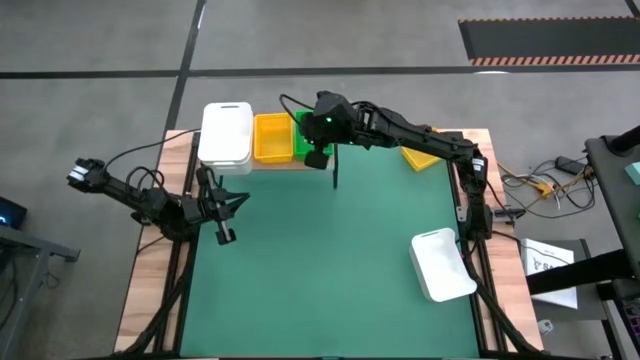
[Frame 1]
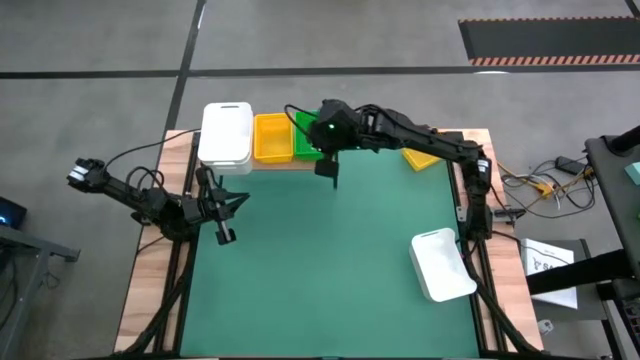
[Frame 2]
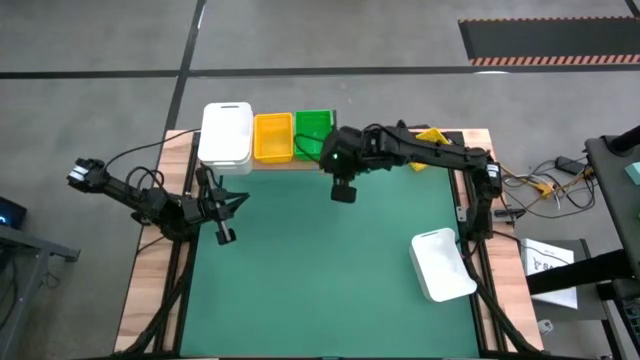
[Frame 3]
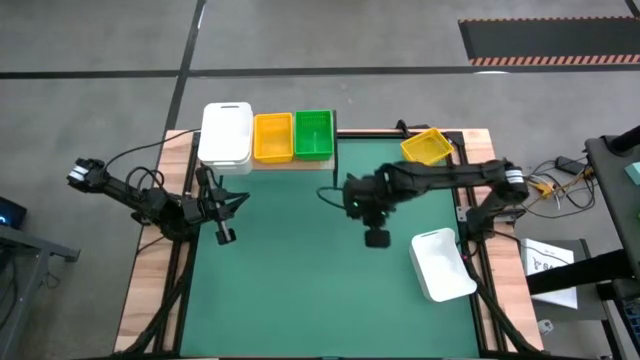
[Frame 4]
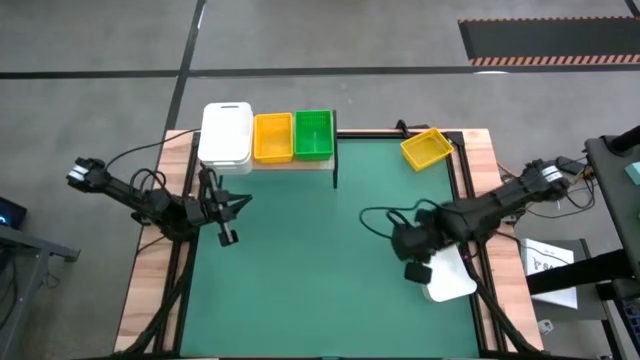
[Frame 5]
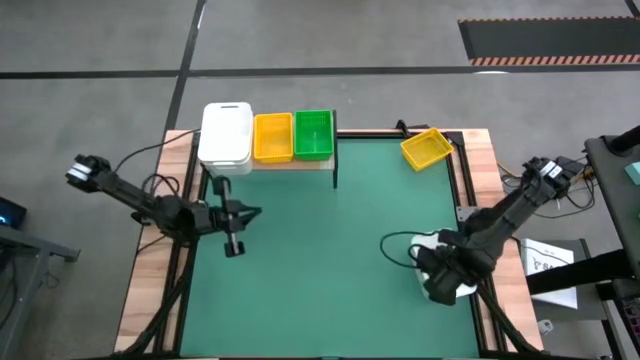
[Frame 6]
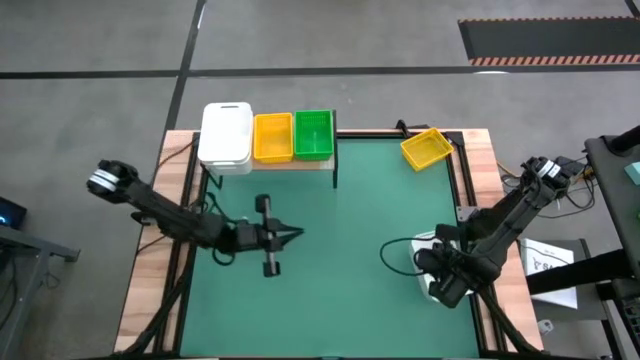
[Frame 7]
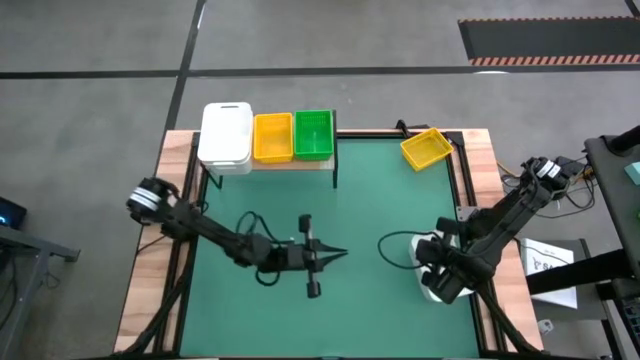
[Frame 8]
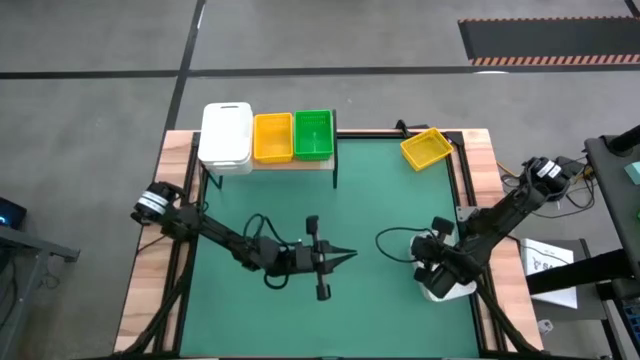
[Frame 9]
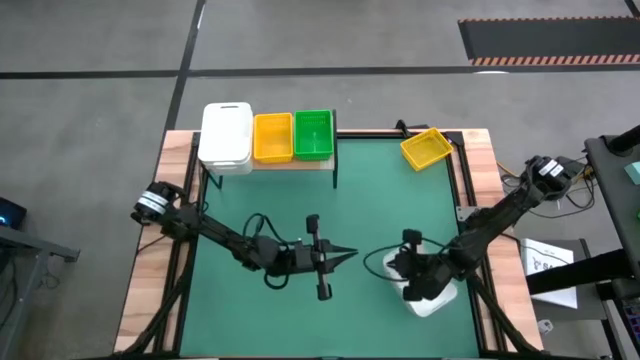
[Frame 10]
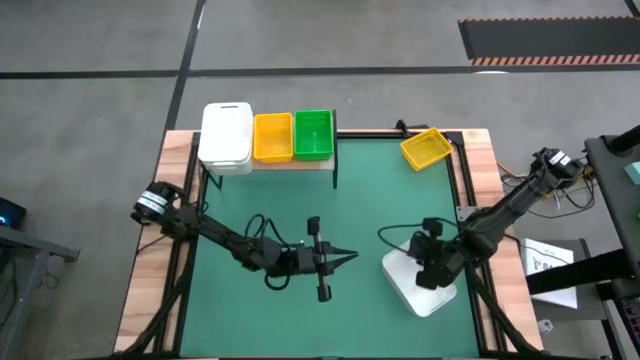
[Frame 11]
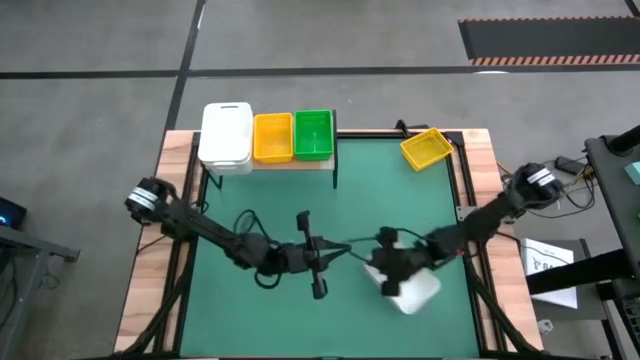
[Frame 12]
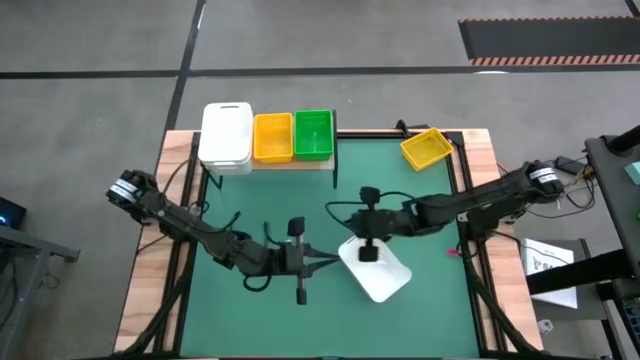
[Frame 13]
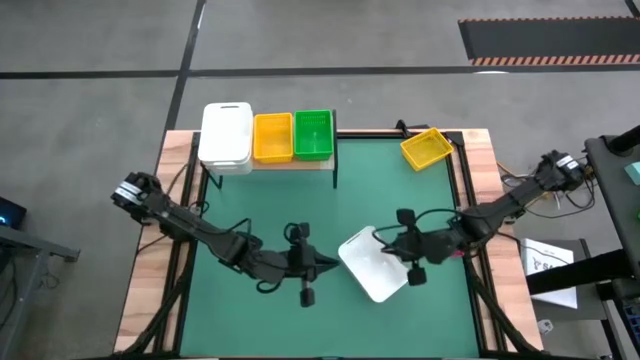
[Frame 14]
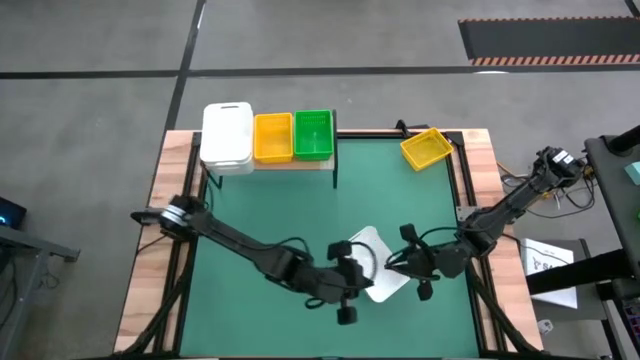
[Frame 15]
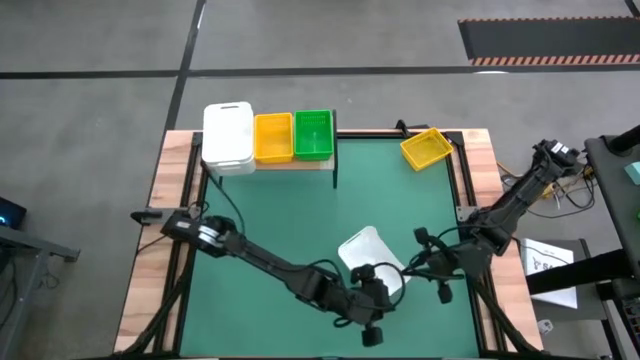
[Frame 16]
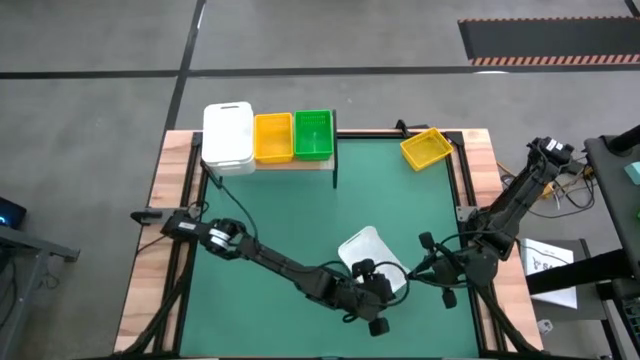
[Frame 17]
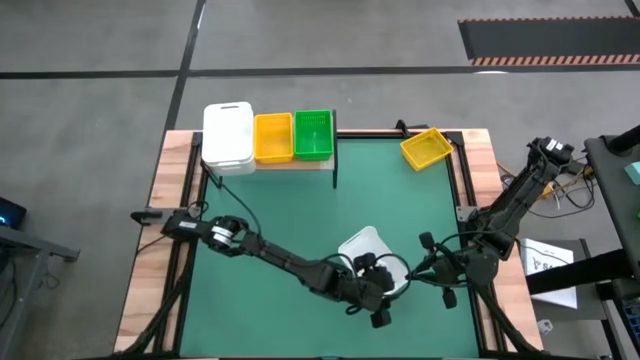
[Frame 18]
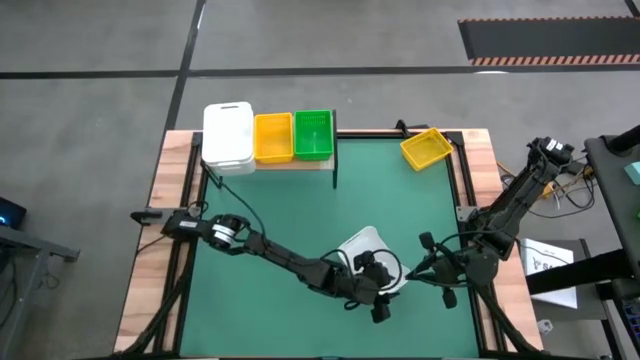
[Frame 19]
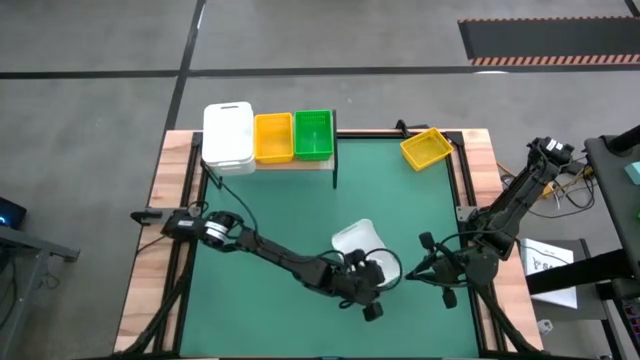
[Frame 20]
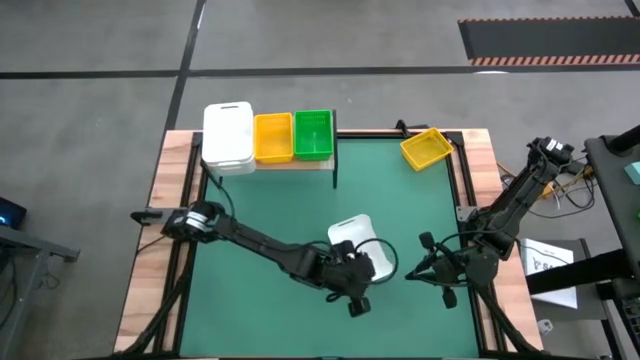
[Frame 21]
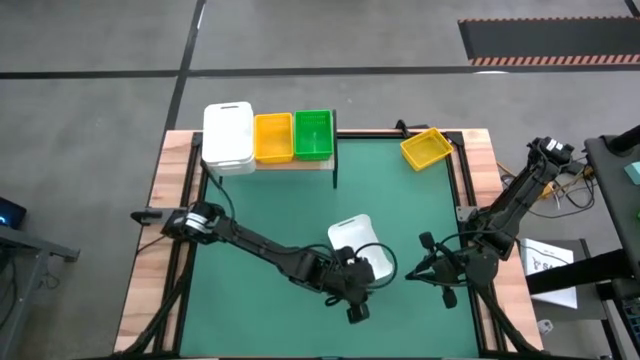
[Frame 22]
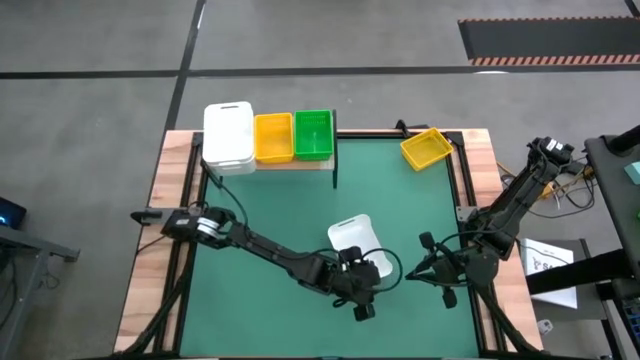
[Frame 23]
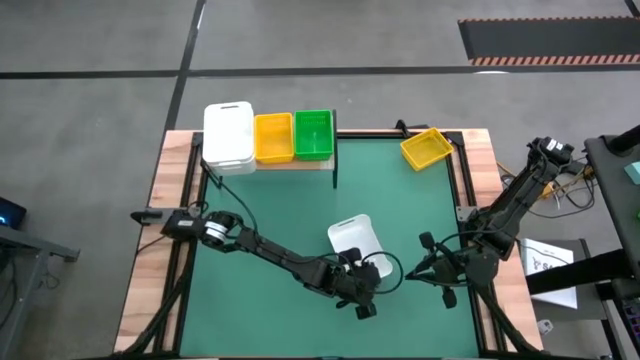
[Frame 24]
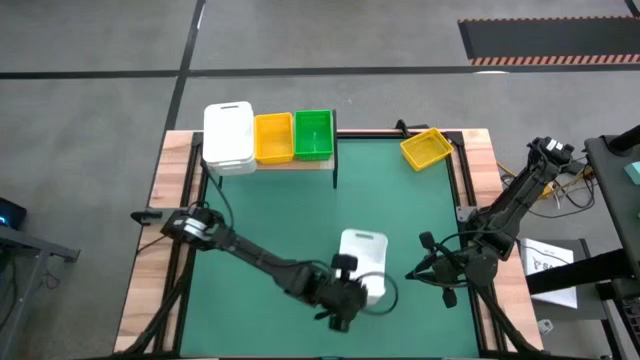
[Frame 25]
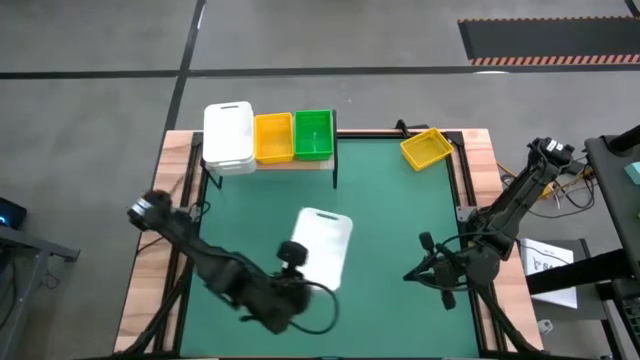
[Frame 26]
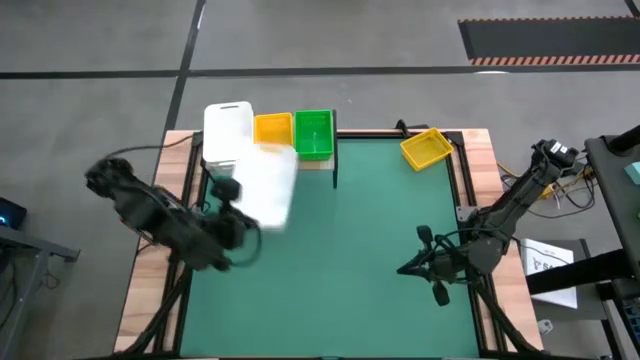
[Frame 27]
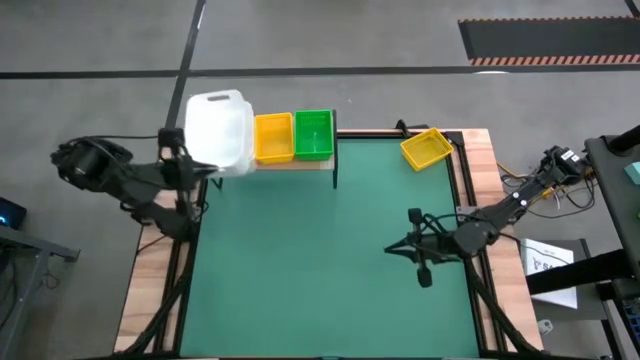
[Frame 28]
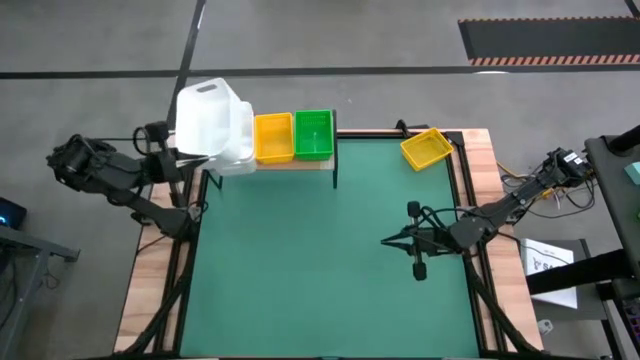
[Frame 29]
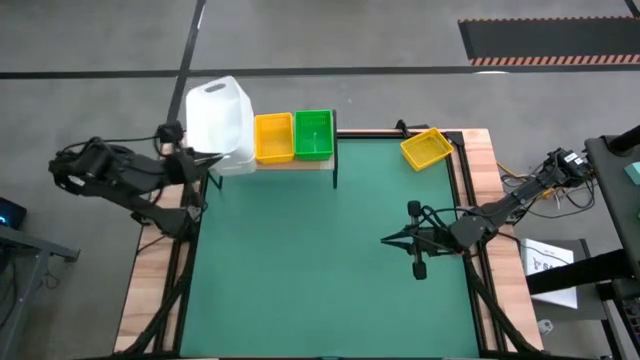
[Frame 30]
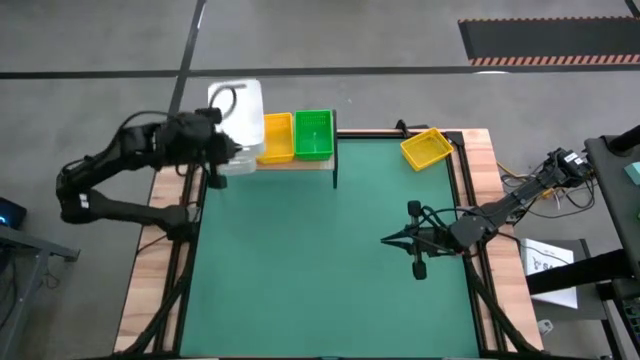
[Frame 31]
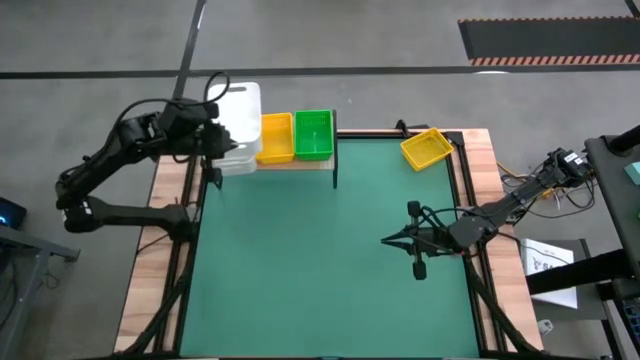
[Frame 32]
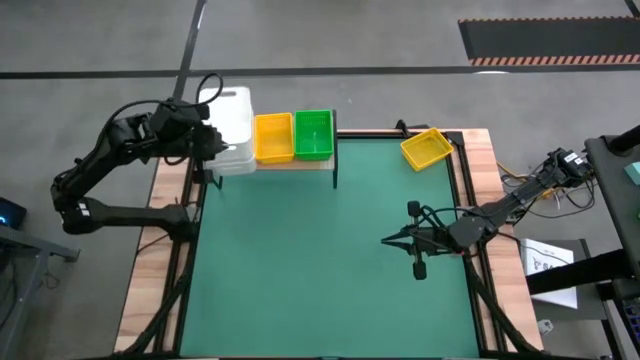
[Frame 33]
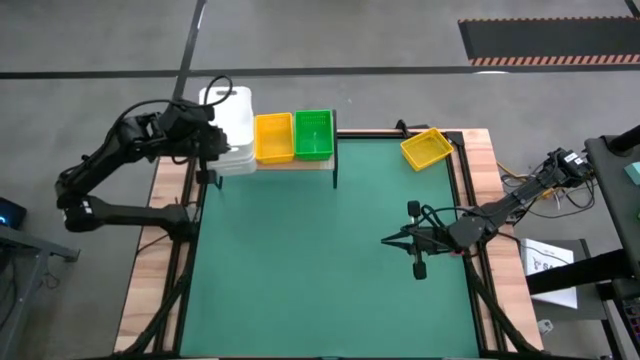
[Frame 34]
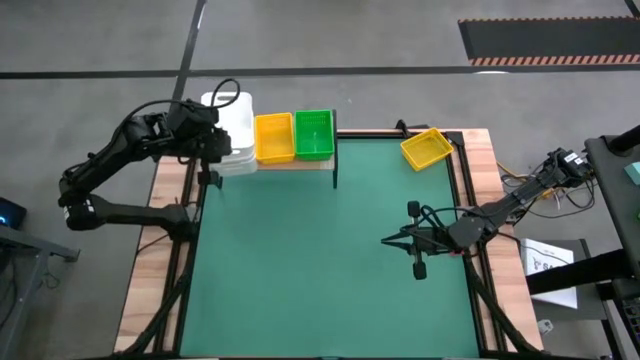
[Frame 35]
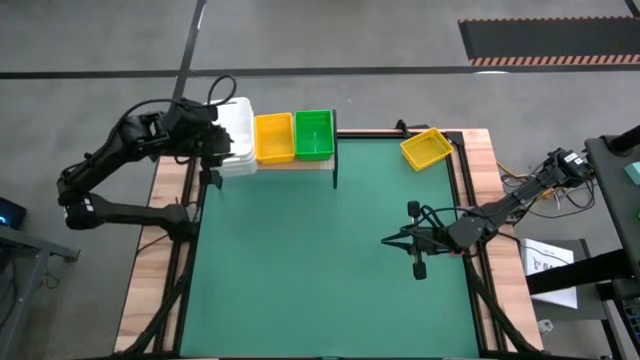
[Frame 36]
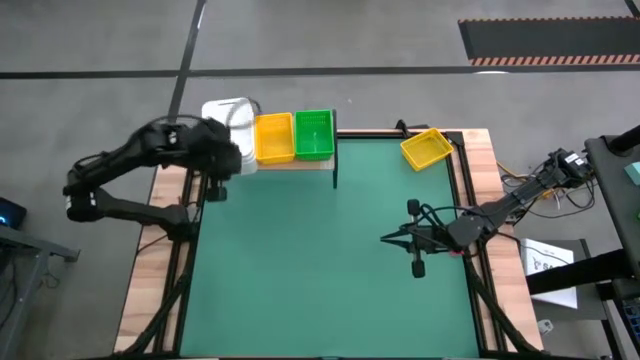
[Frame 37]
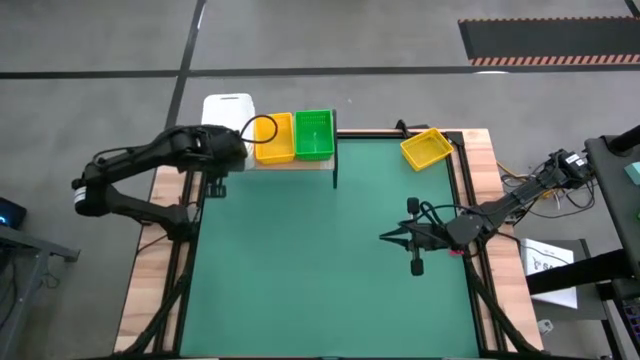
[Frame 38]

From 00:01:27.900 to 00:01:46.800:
Stack the white bin on the white bin on the shelf
